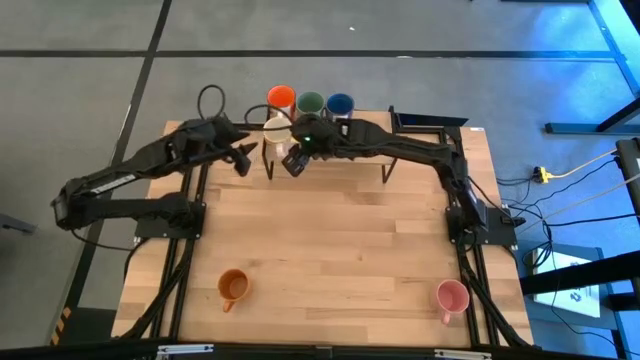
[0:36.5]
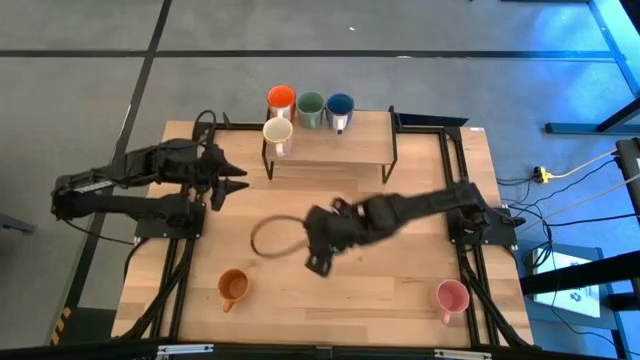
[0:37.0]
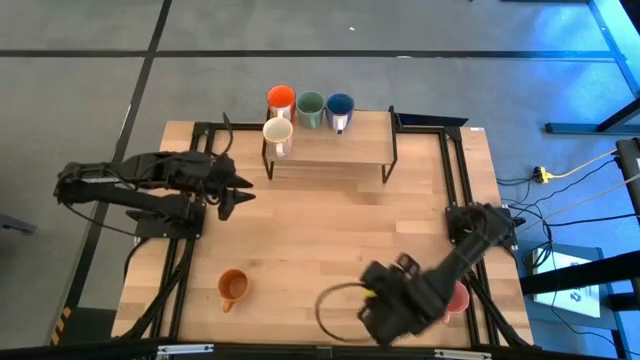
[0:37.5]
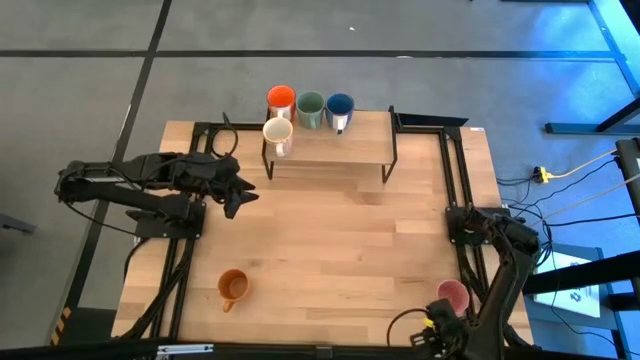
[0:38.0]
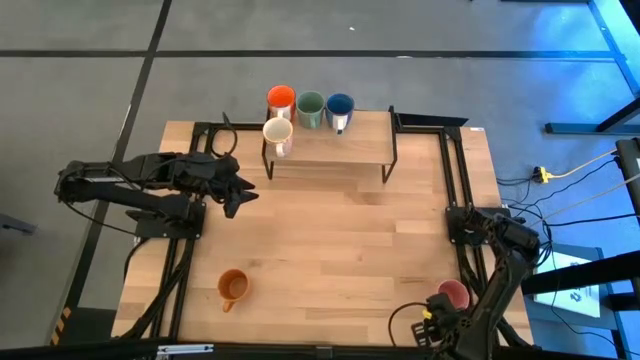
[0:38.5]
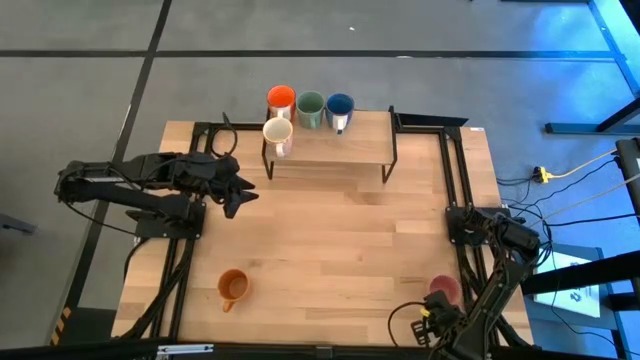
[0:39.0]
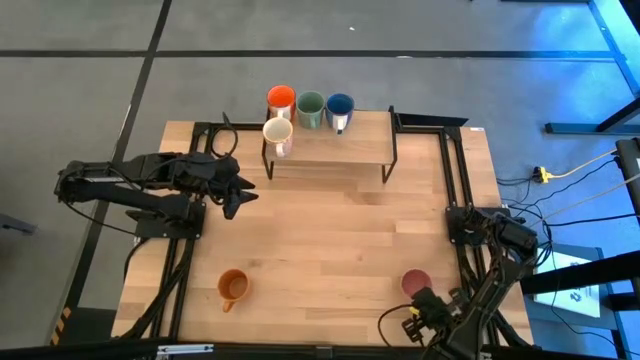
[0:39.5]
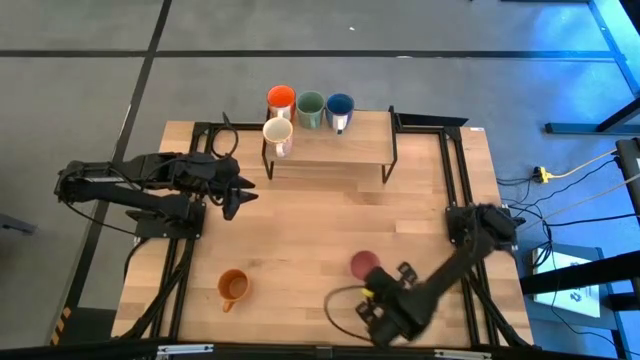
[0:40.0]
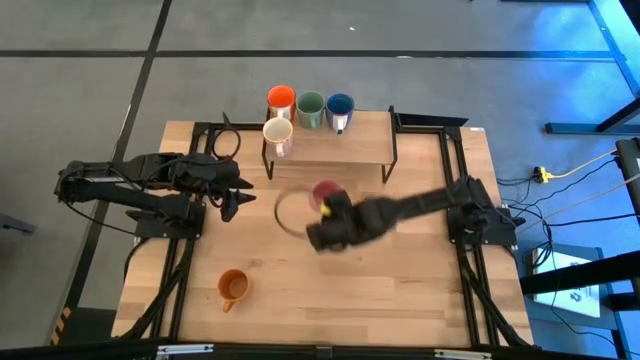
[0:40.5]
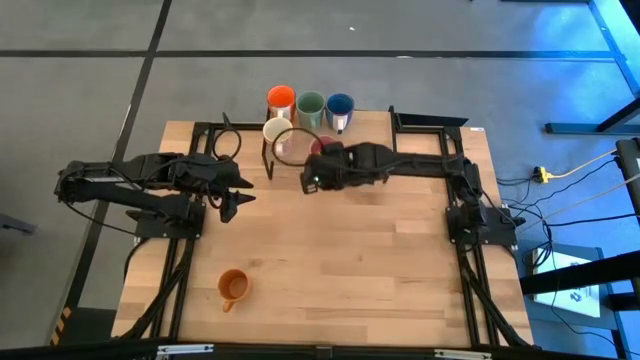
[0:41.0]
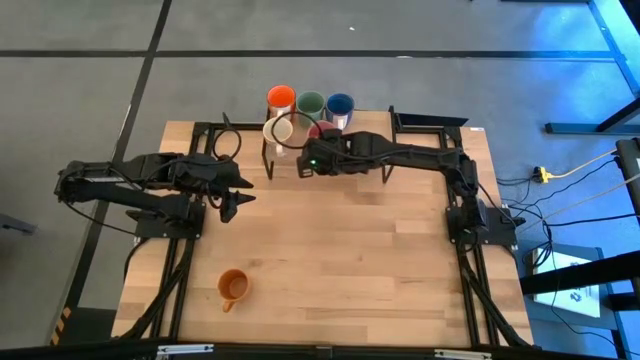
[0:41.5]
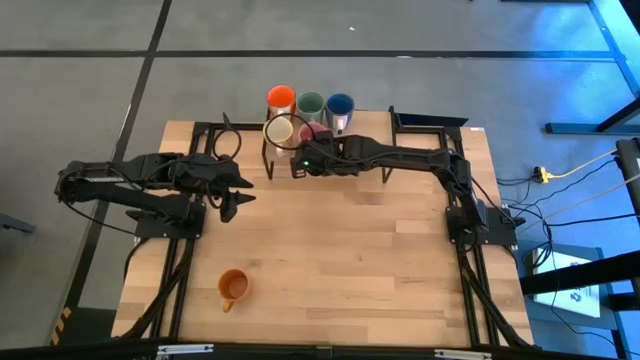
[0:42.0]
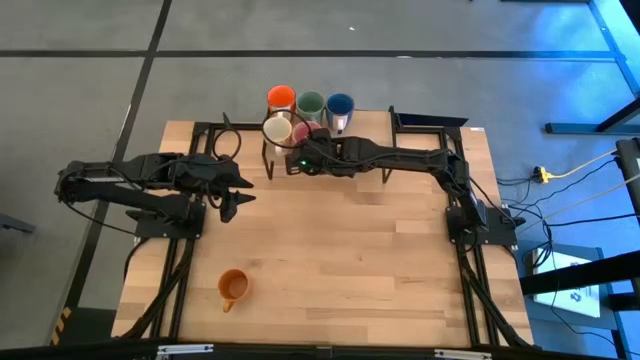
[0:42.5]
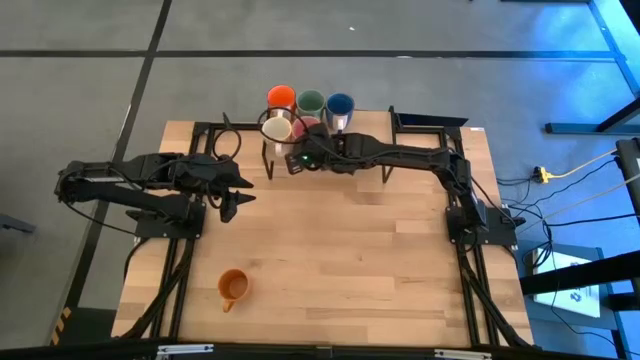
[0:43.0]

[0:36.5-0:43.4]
Task: Place coffee mugs
Put the pink mug on the shelf

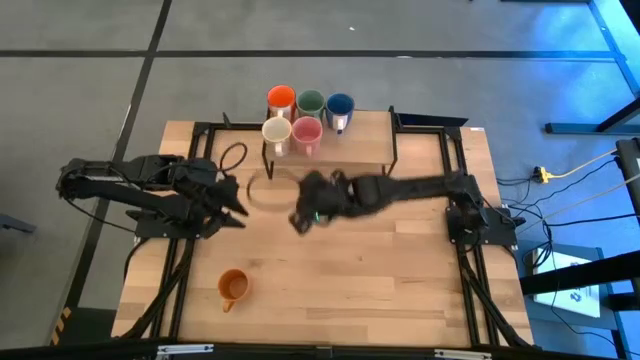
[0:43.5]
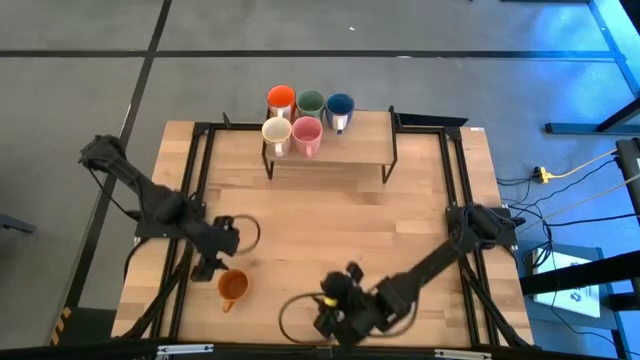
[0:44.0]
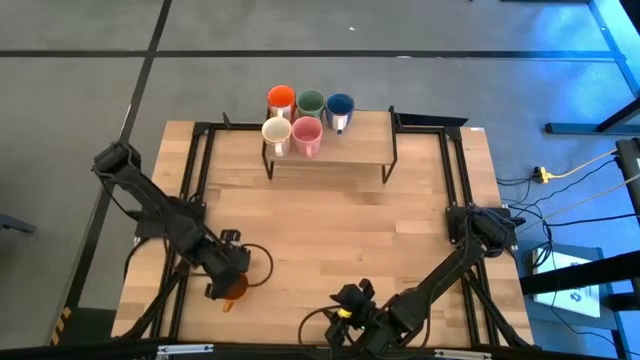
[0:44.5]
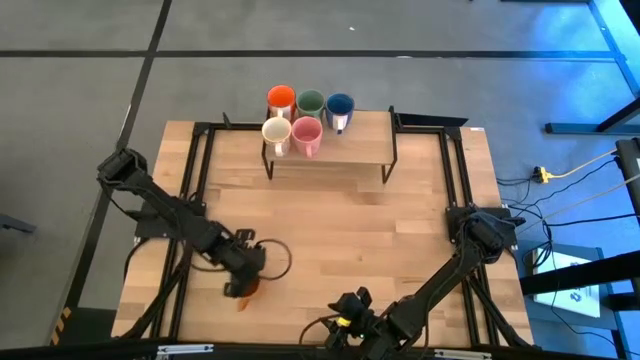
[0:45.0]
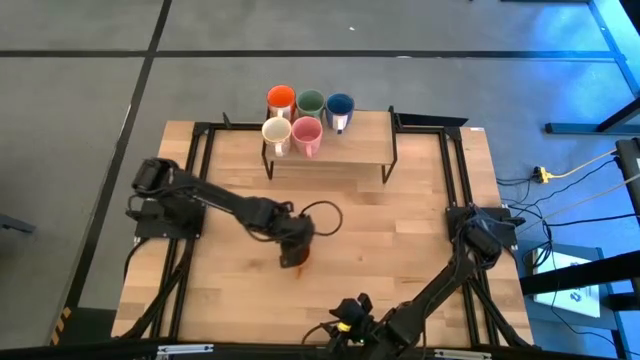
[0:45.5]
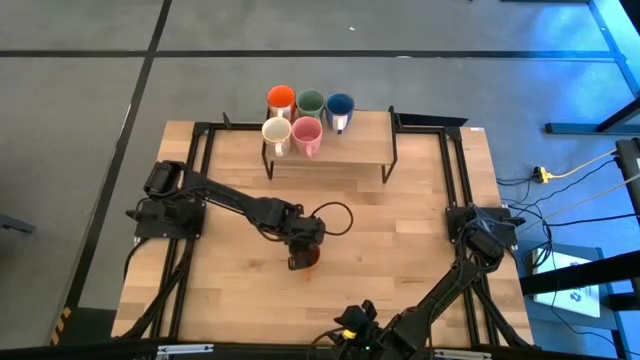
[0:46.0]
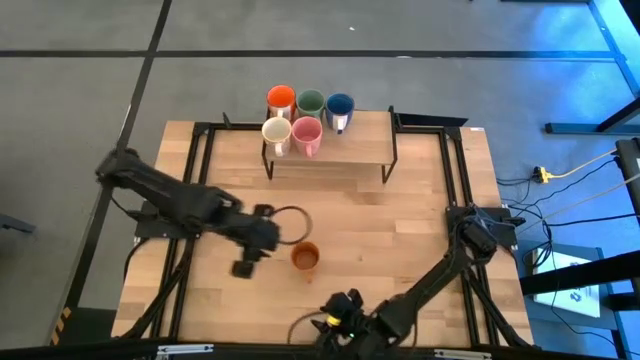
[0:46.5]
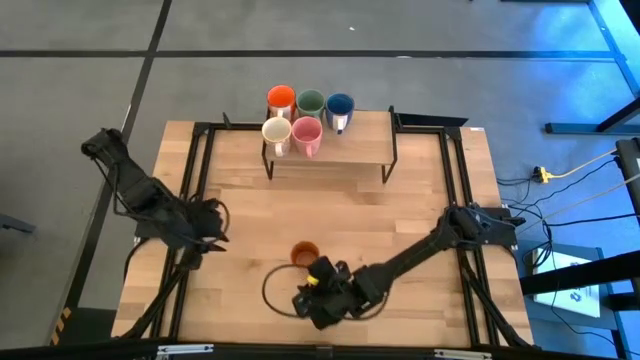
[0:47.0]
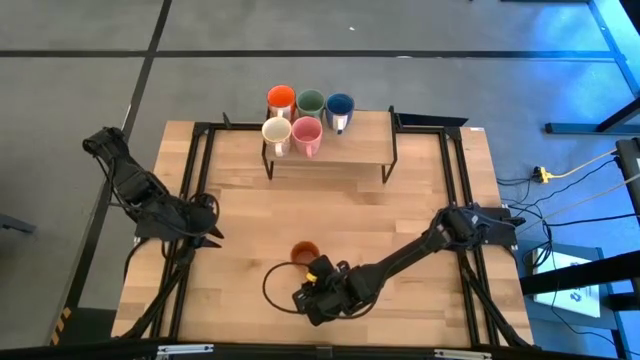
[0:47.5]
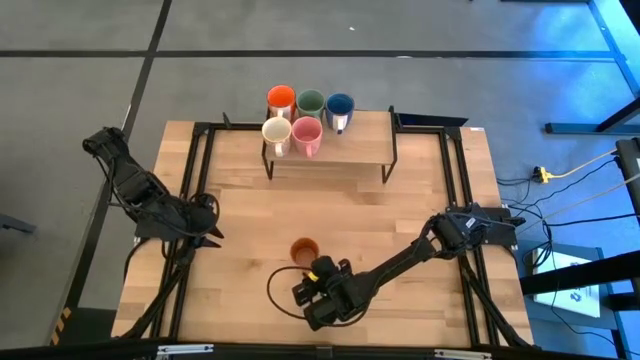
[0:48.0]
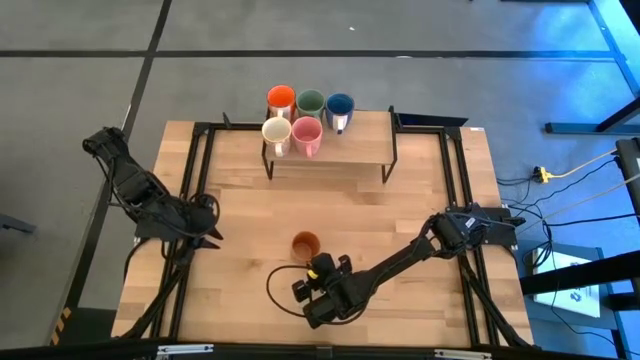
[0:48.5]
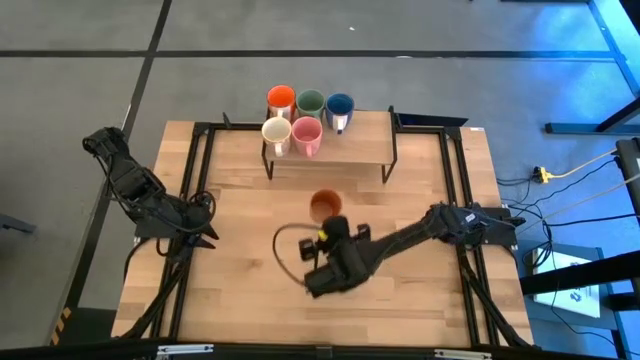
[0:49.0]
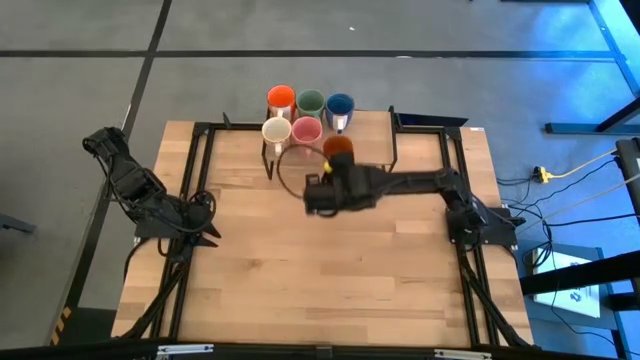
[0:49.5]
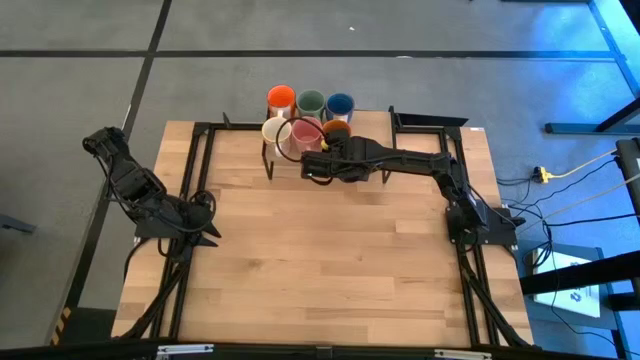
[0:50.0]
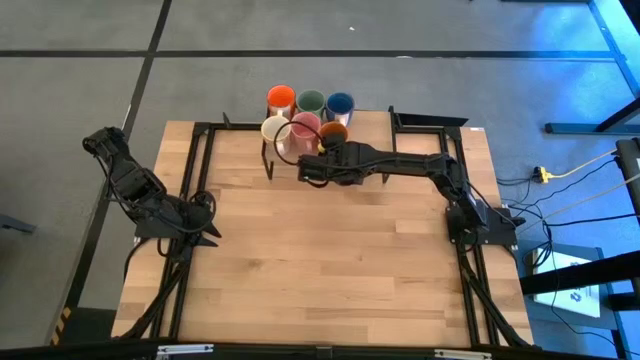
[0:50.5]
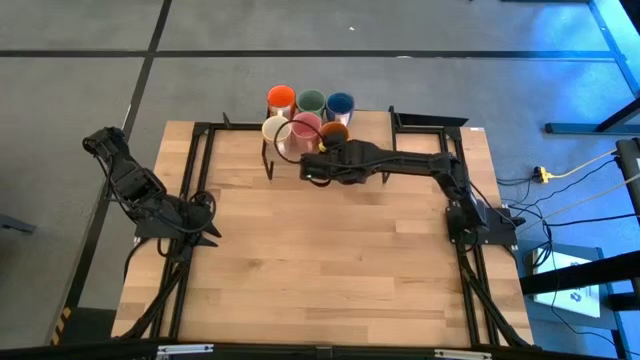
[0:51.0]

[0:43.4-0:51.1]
Put the brown mug on the shelf

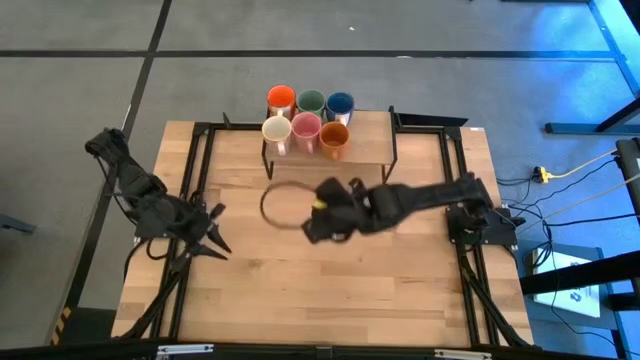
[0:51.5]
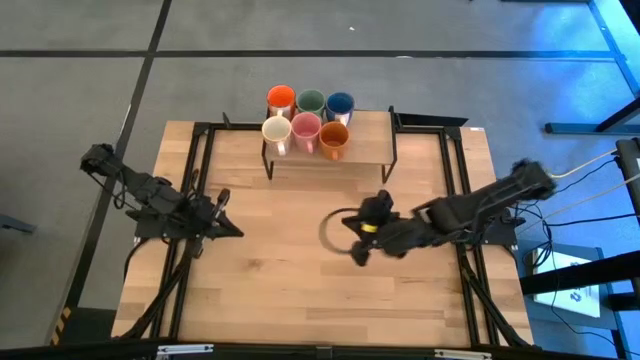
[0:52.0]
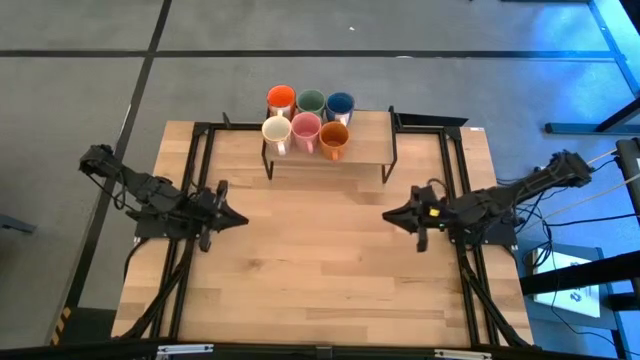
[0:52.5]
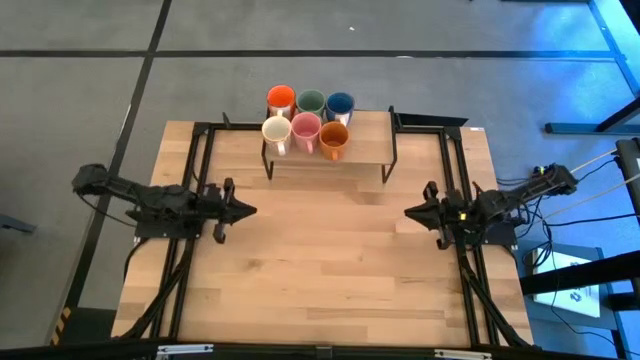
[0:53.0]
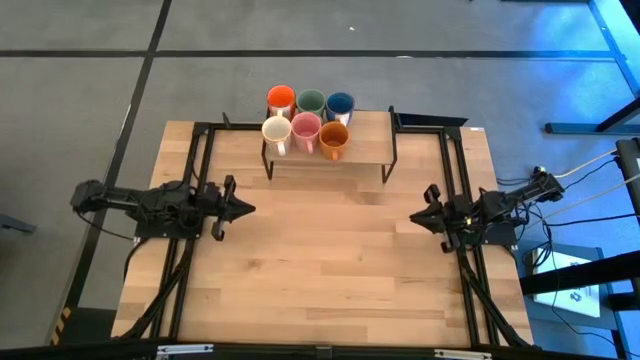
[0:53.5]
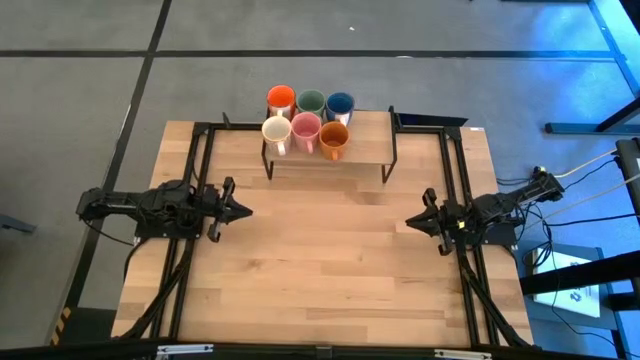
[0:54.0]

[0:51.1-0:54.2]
Return to Home Position

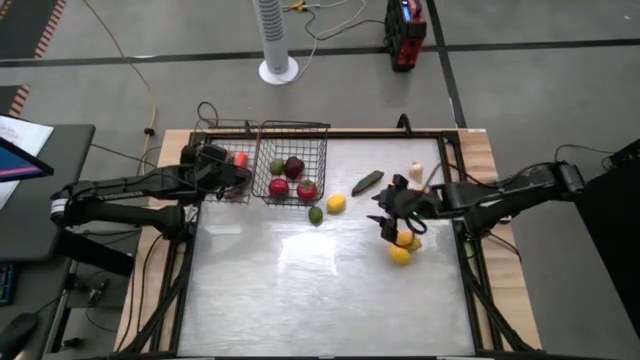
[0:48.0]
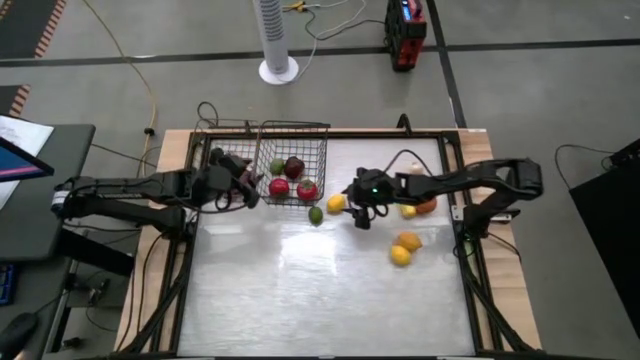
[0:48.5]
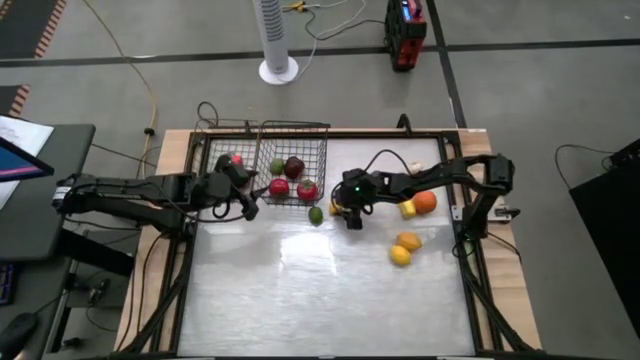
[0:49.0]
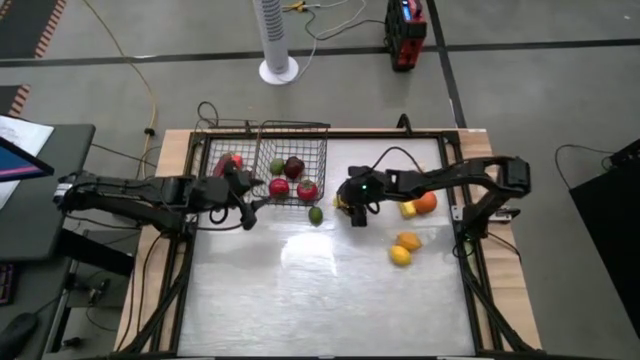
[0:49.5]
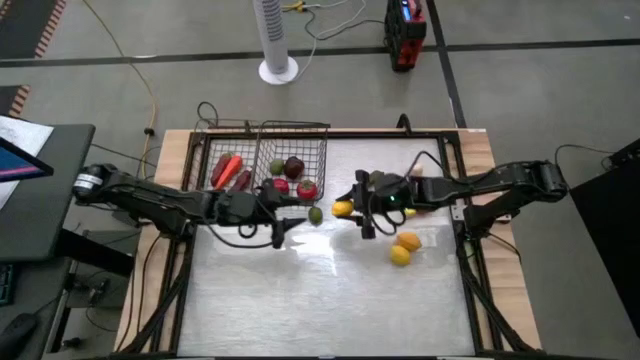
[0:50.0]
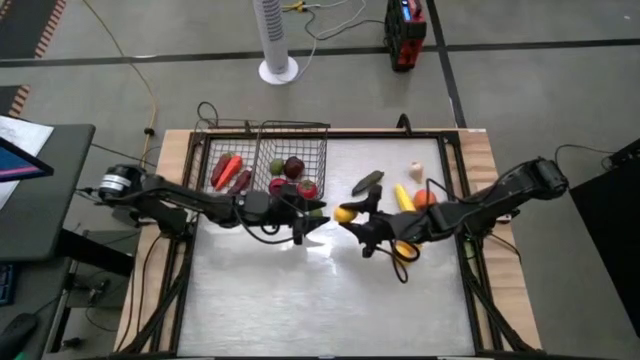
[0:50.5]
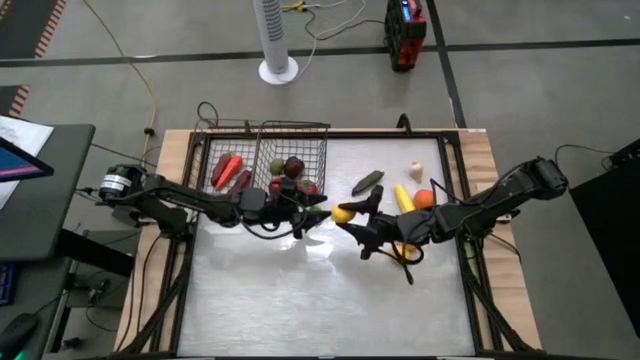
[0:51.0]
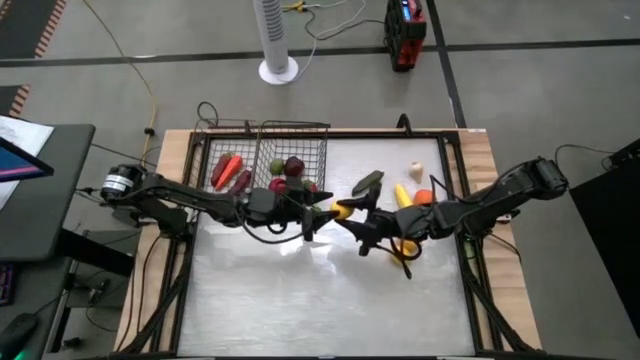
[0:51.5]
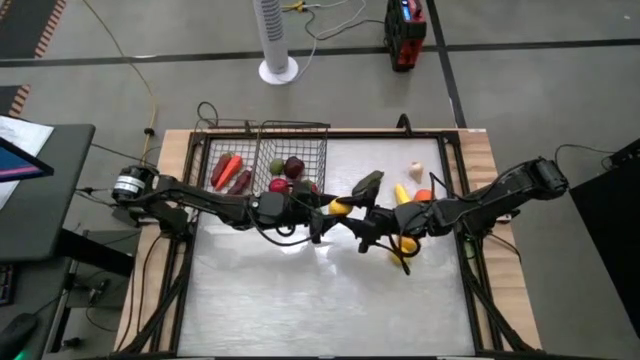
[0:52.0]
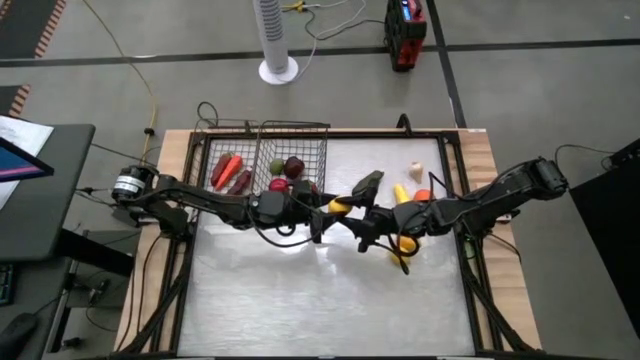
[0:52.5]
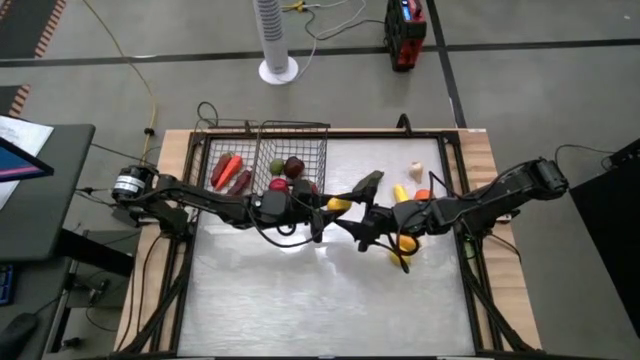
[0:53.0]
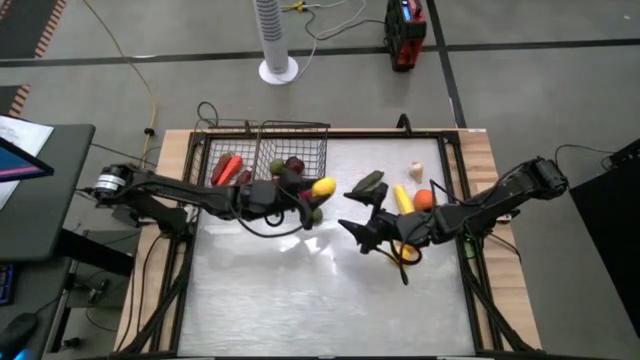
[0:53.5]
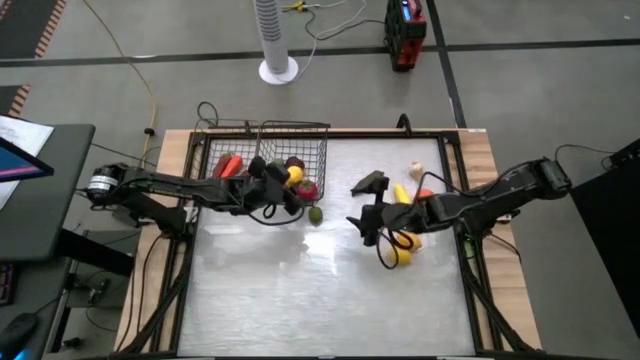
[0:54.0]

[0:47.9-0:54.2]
Task: Sort produce into baskets
Put the top left lemon into the right wire basket
